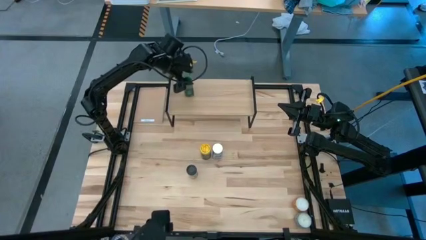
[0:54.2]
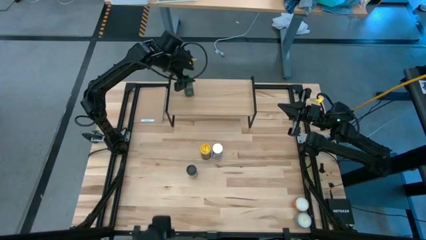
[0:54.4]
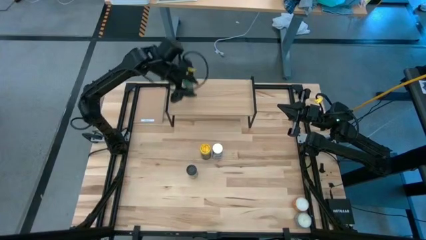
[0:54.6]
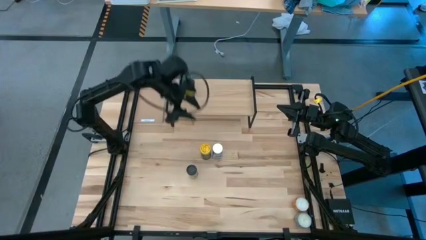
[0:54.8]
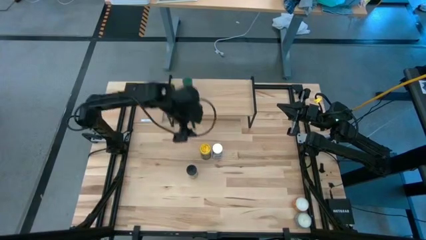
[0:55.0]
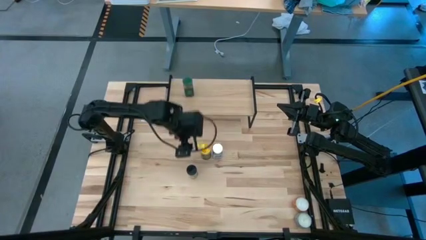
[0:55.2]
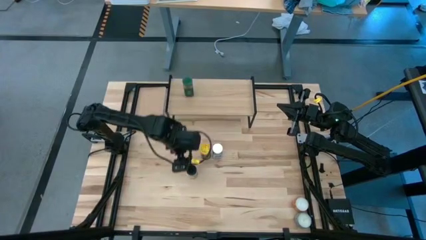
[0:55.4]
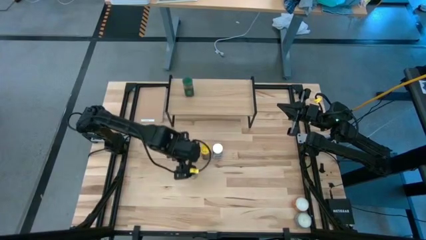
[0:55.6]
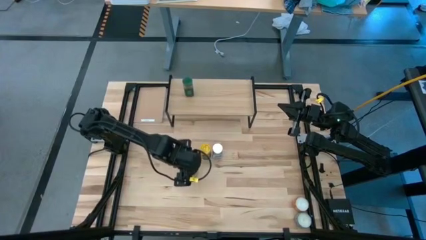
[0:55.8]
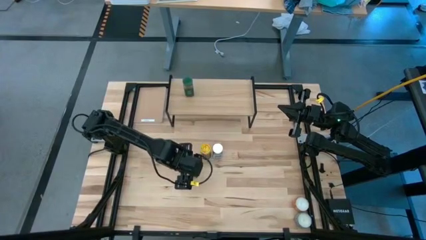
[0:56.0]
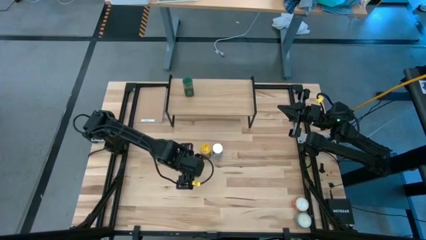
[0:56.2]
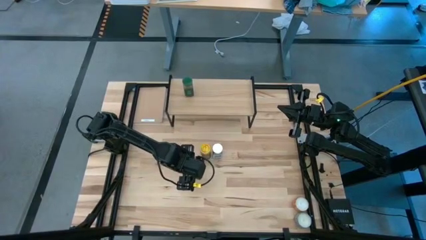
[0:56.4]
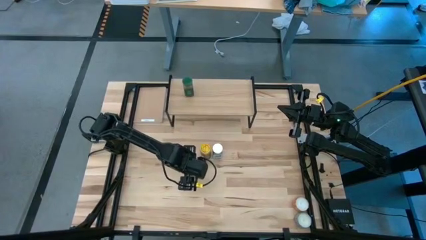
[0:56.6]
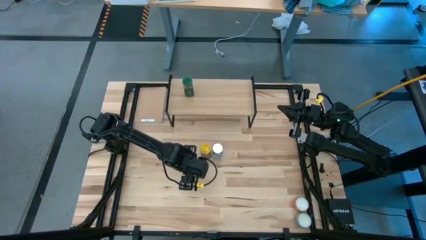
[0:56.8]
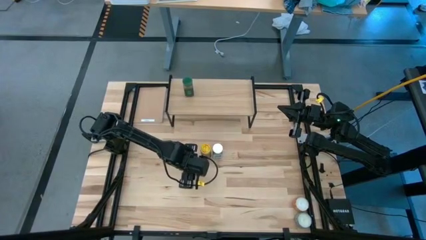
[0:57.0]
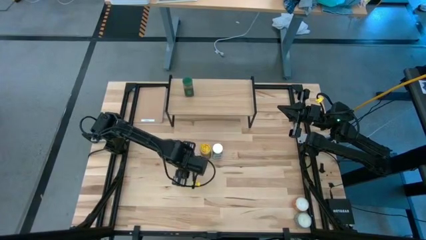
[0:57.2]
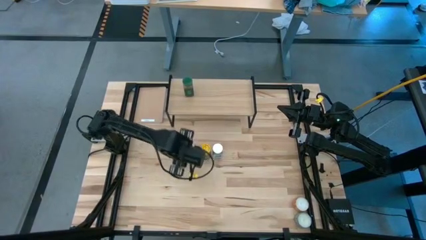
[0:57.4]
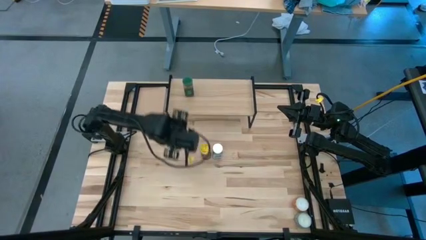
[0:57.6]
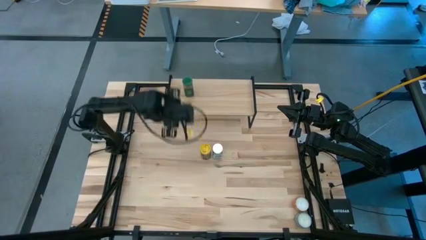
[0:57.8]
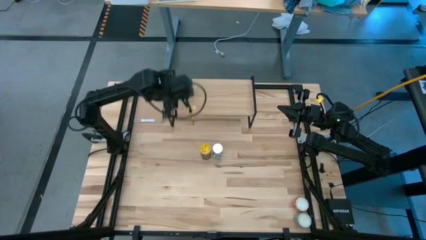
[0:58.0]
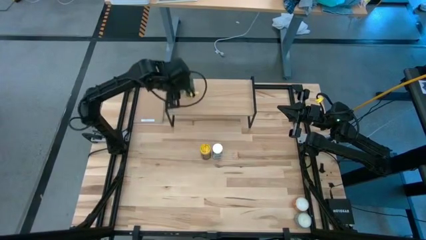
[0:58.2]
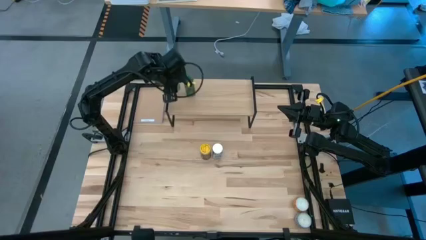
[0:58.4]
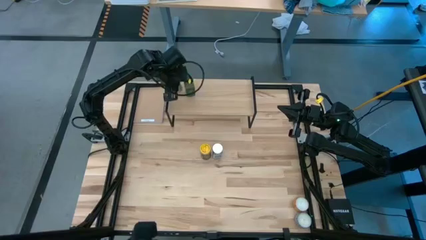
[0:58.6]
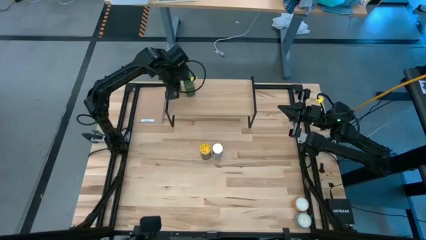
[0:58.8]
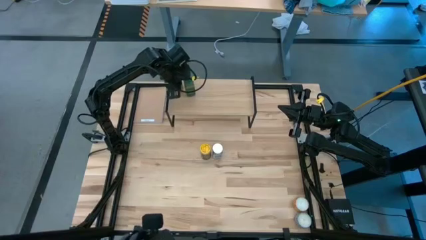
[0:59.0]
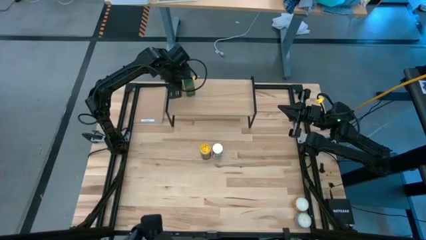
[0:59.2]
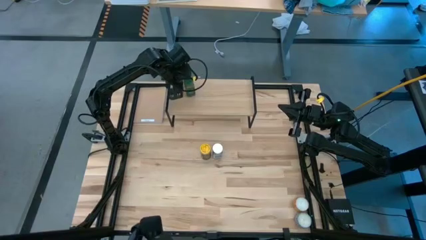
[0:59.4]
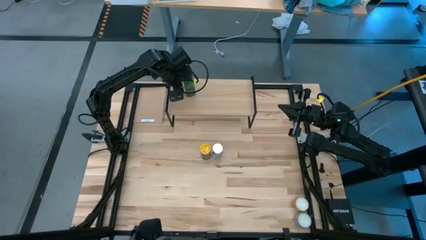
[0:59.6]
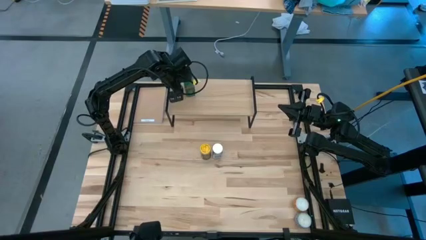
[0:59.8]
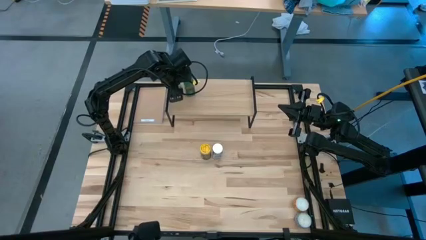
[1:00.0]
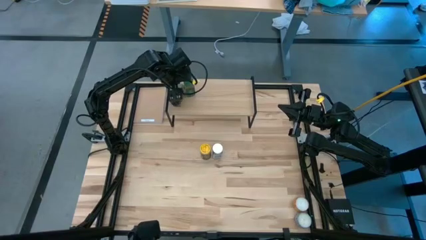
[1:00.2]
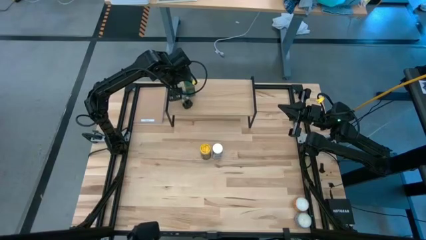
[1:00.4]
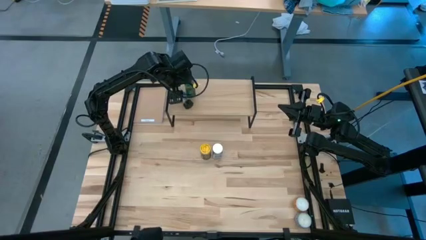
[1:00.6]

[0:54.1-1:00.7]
Task: Shelf spices
Put the black seasoning bottle onto the shelf

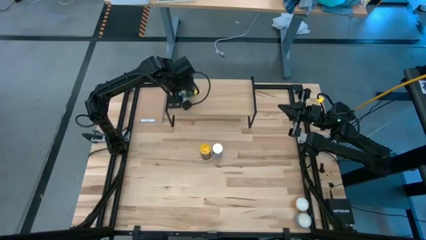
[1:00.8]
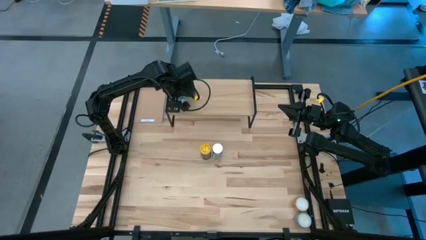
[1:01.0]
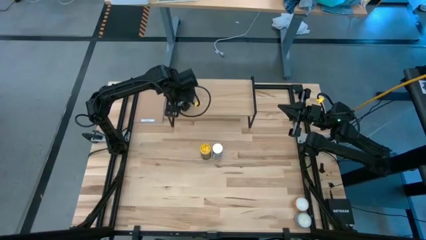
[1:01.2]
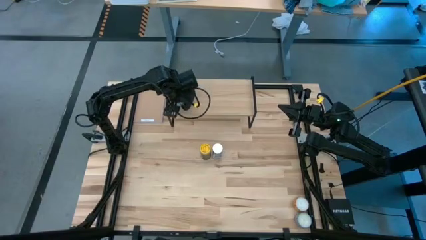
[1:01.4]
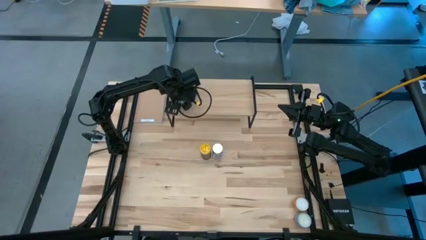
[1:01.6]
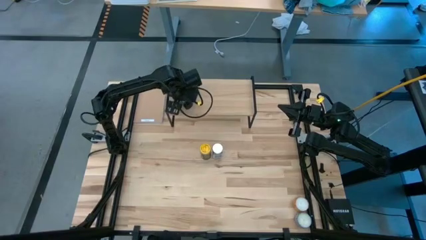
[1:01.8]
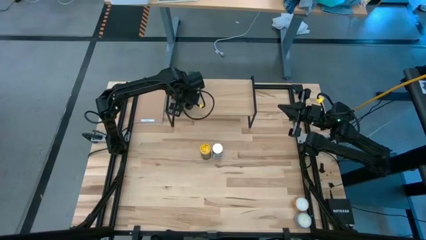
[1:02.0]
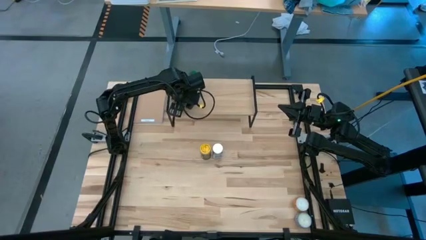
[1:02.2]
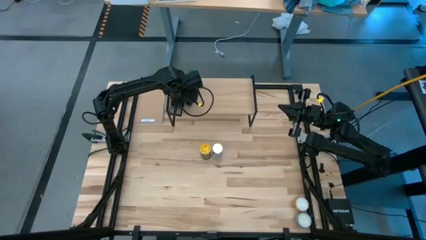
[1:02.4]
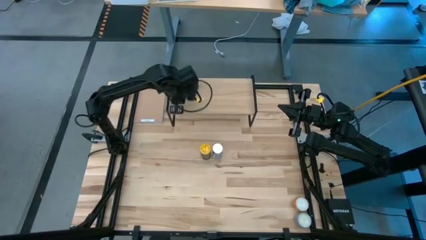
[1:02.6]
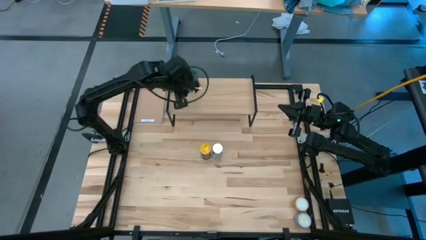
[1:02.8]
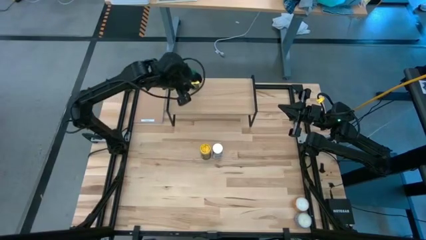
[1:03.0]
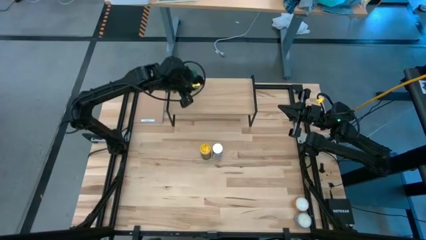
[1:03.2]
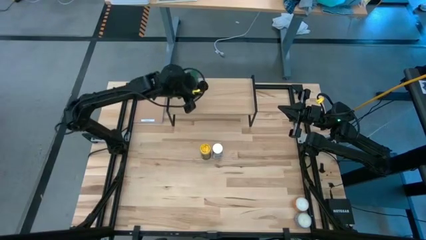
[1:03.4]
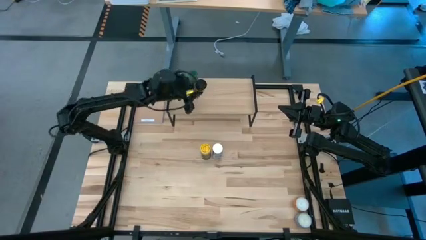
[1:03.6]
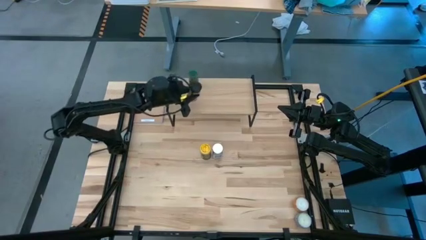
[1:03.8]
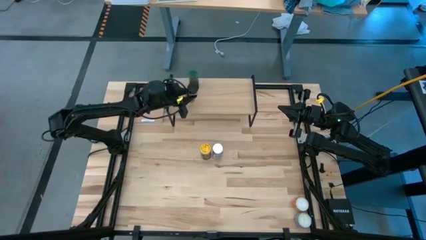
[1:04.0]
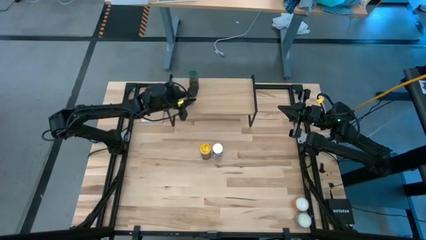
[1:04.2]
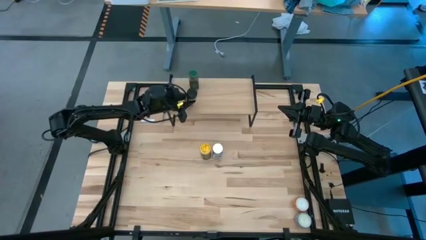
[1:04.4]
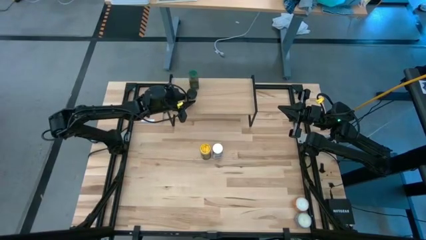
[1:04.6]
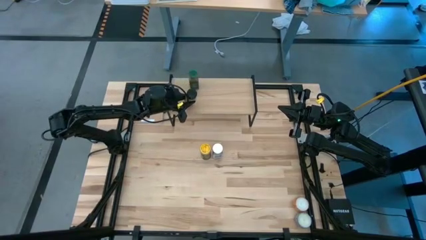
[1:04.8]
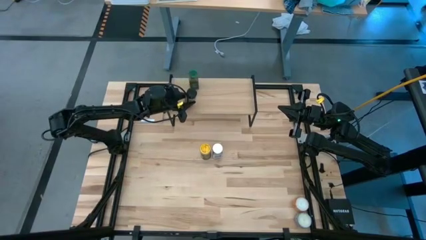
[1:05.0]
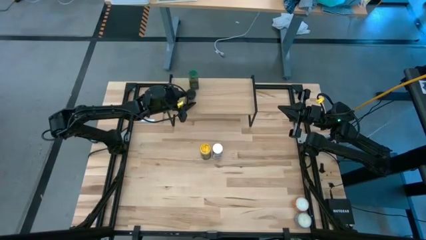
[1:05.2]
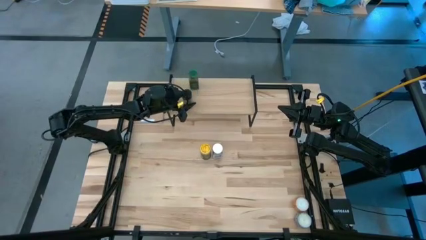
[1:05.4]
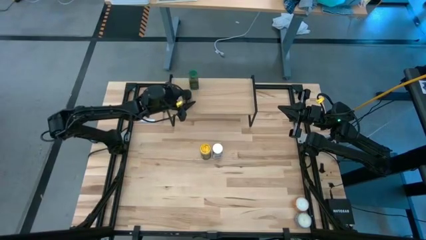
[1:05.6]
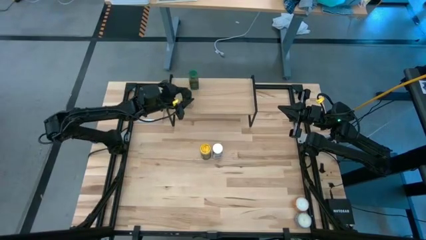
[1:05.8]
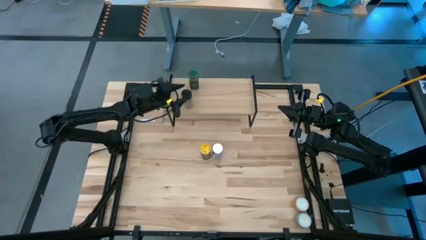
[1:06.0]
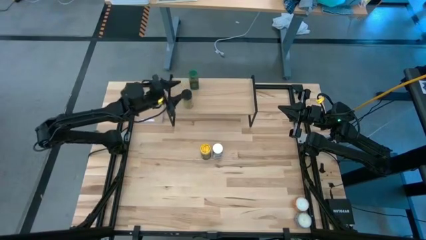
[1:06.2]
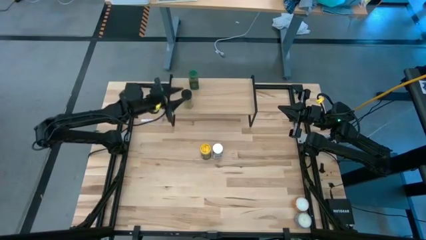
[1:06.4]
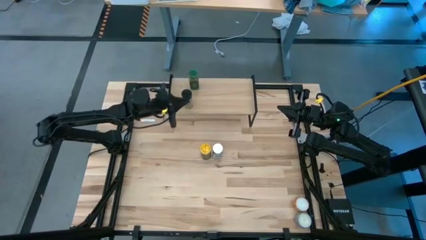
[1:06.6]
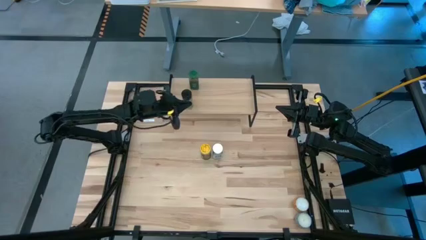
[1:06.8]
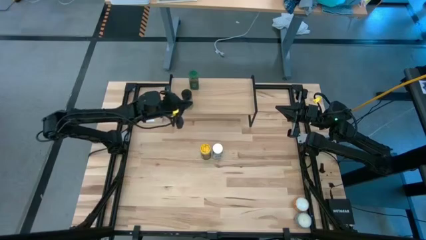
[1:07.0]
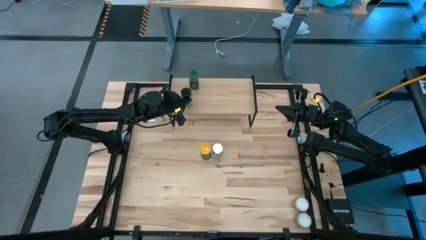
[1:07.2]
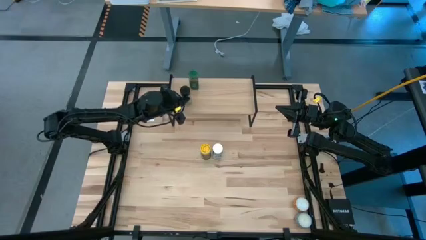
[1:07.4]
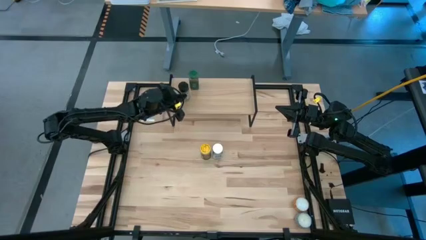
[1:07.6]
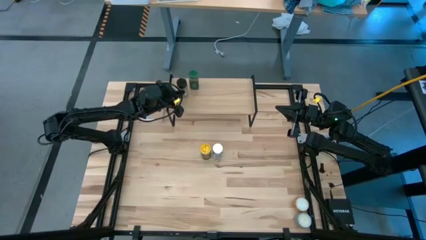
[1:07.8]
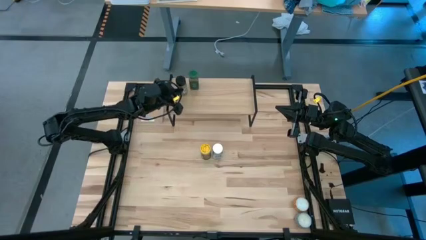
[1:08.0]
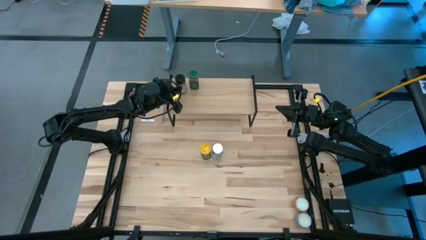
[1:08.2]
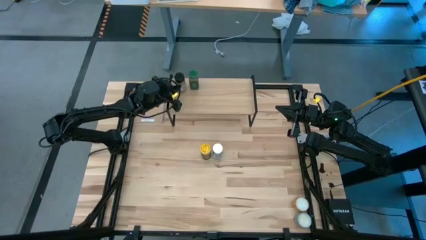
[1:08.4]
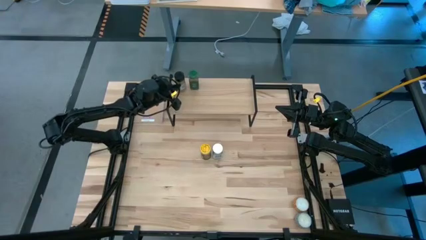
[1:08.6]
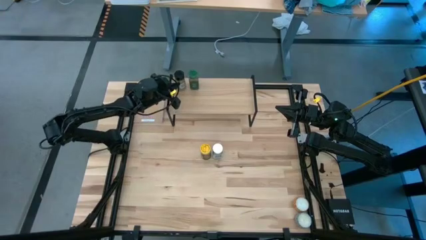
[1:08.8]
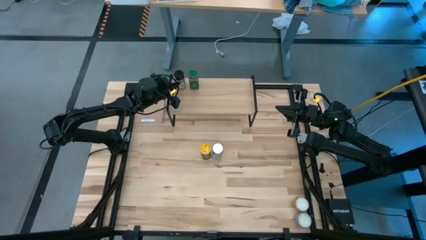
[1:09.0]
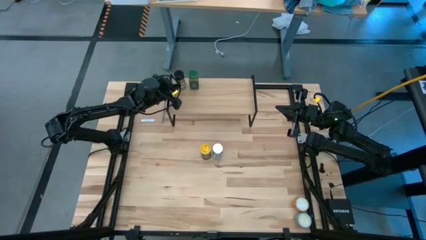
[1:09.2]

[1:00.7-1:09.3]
Put the black seasoning bottle on the shelf
